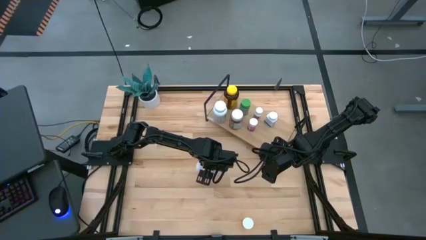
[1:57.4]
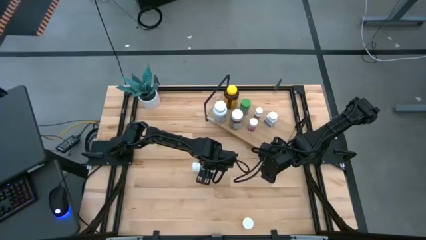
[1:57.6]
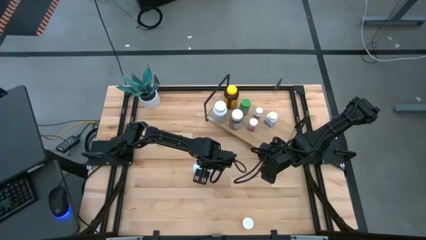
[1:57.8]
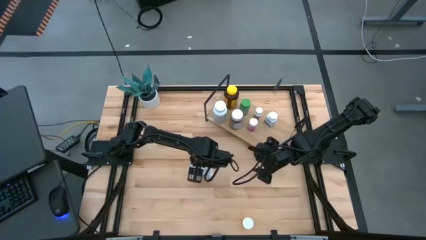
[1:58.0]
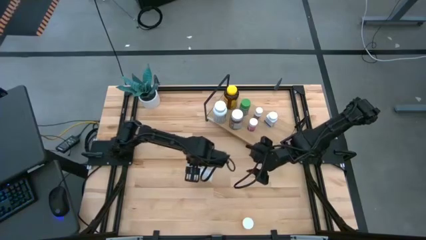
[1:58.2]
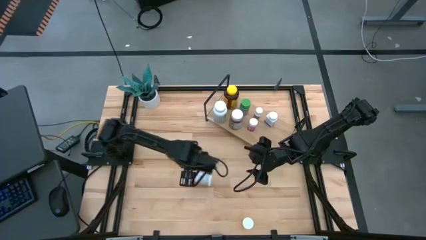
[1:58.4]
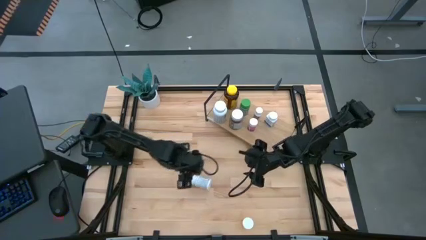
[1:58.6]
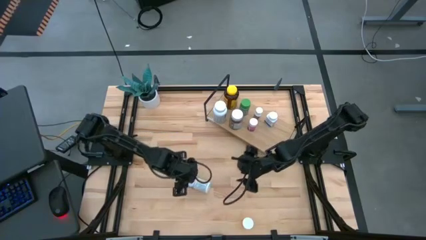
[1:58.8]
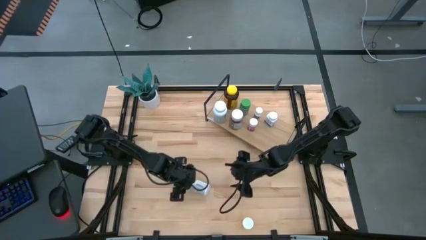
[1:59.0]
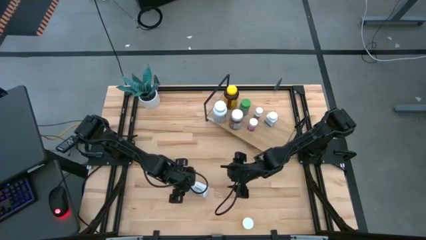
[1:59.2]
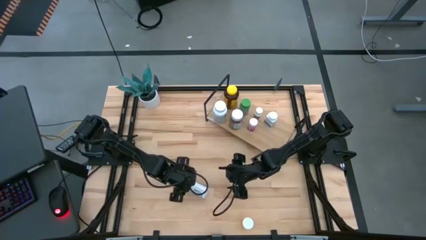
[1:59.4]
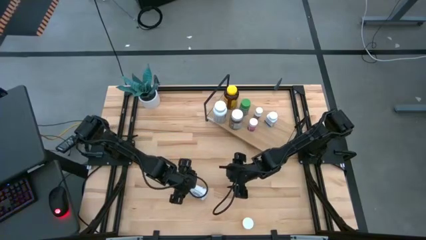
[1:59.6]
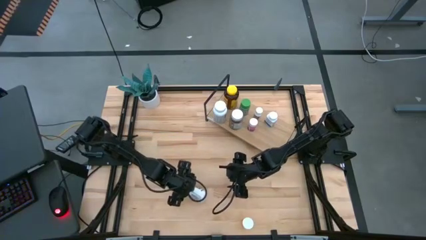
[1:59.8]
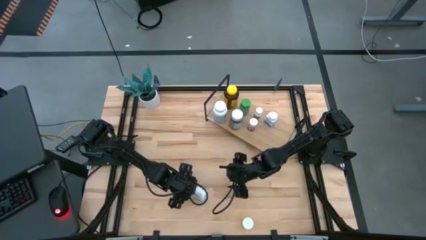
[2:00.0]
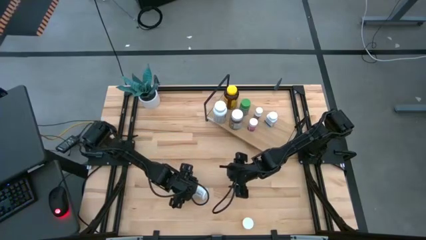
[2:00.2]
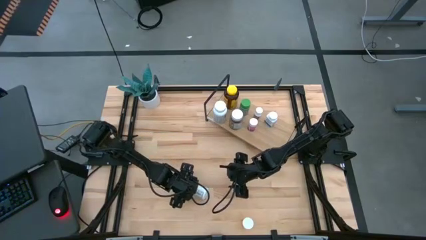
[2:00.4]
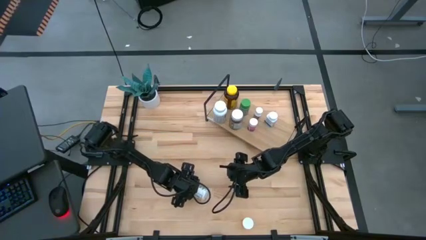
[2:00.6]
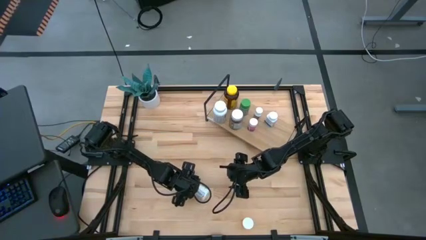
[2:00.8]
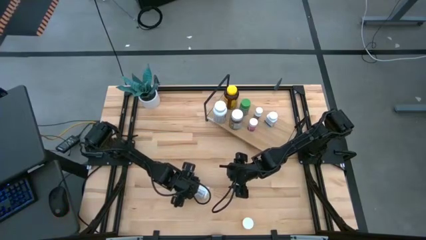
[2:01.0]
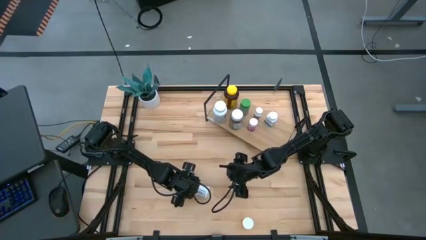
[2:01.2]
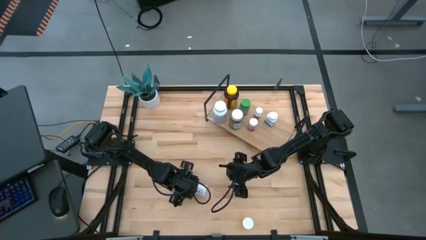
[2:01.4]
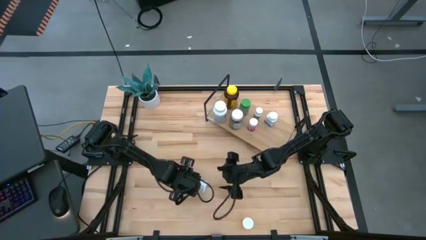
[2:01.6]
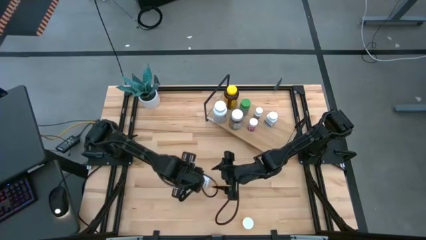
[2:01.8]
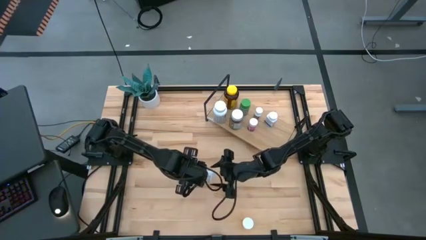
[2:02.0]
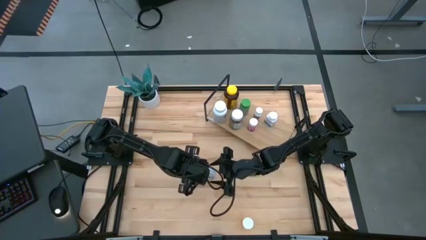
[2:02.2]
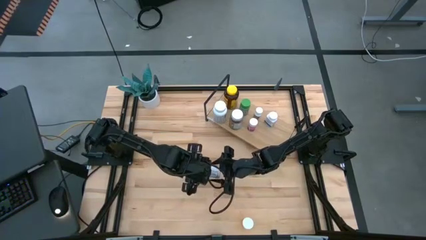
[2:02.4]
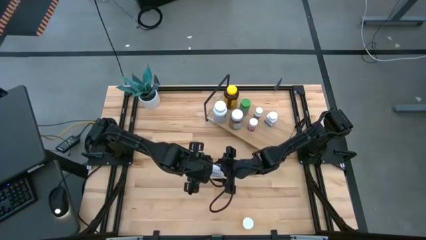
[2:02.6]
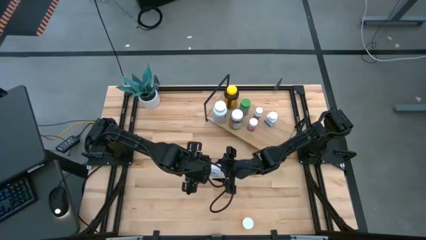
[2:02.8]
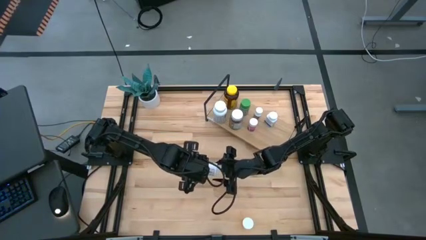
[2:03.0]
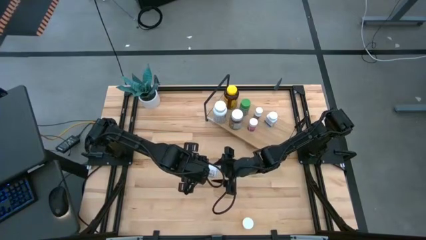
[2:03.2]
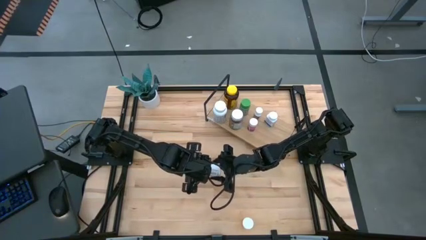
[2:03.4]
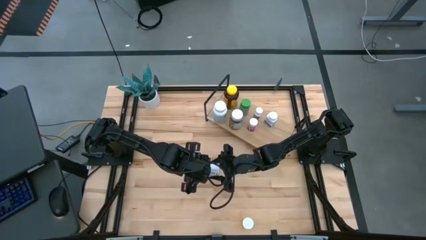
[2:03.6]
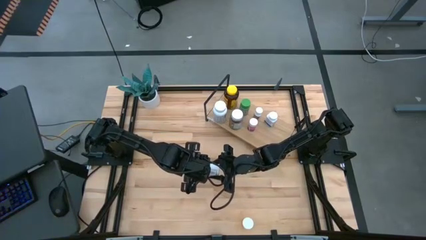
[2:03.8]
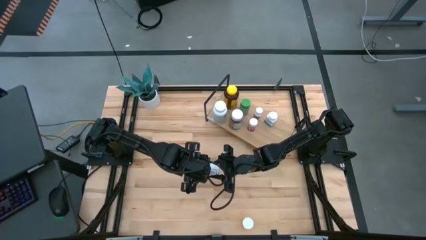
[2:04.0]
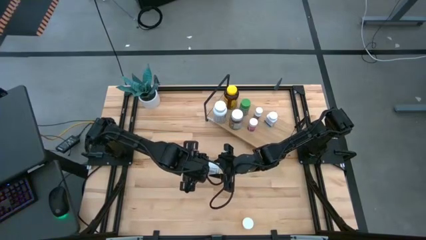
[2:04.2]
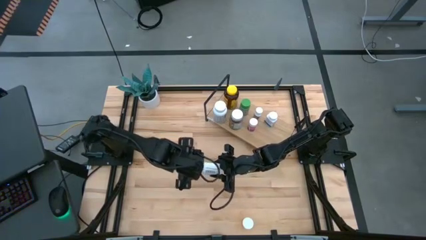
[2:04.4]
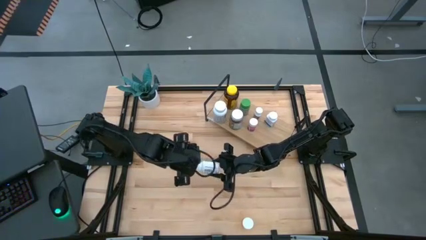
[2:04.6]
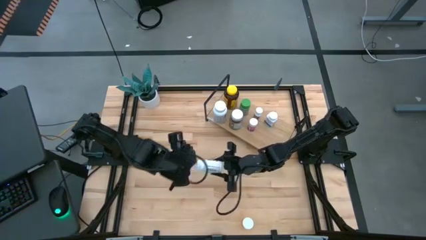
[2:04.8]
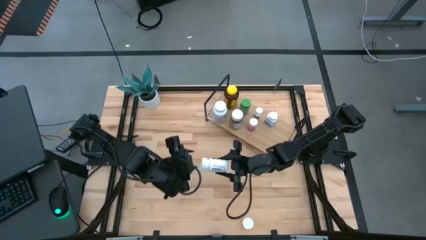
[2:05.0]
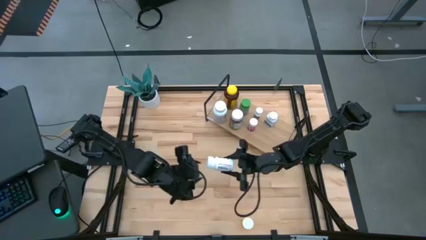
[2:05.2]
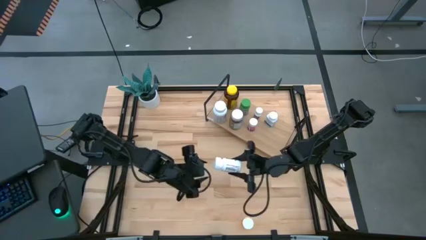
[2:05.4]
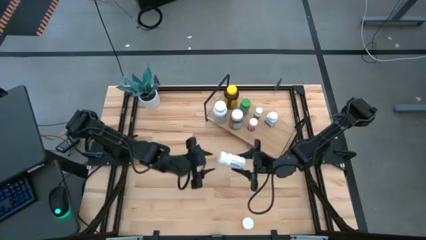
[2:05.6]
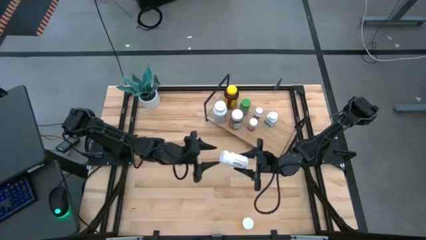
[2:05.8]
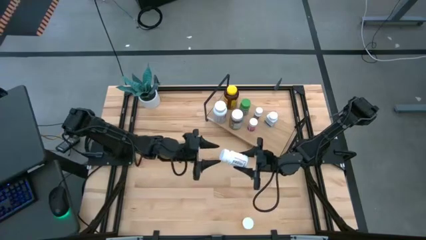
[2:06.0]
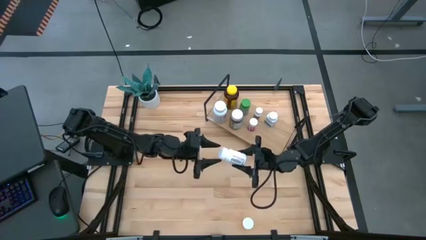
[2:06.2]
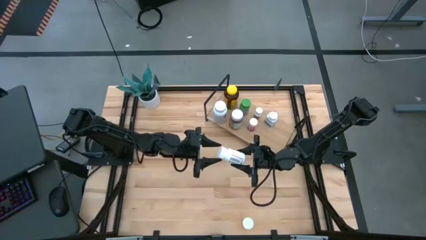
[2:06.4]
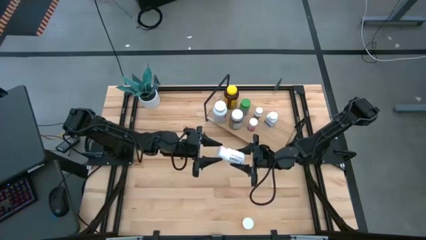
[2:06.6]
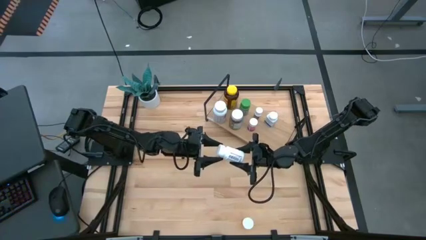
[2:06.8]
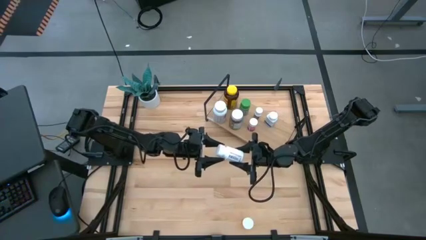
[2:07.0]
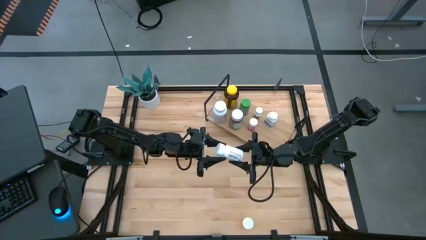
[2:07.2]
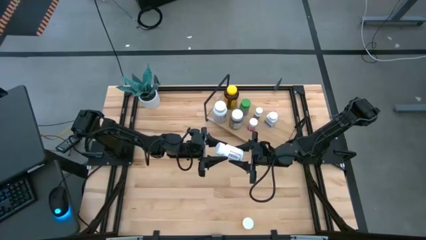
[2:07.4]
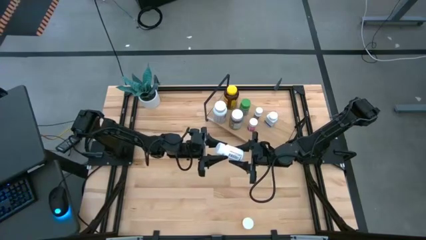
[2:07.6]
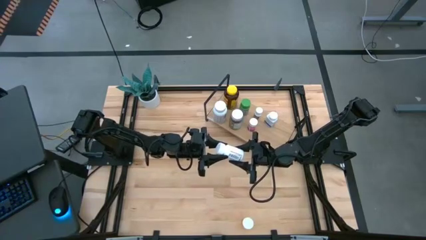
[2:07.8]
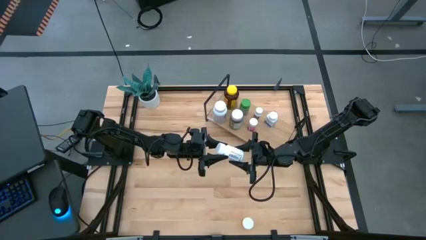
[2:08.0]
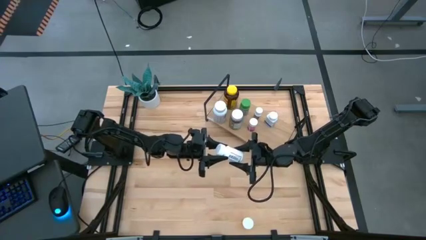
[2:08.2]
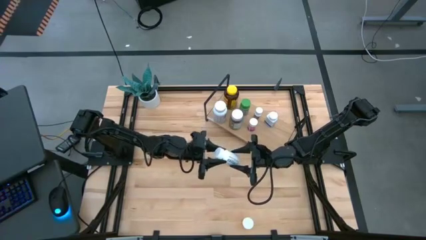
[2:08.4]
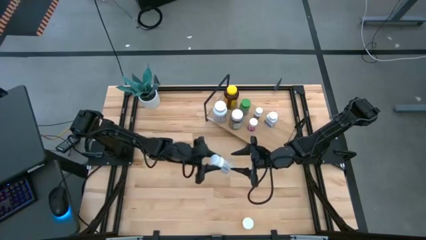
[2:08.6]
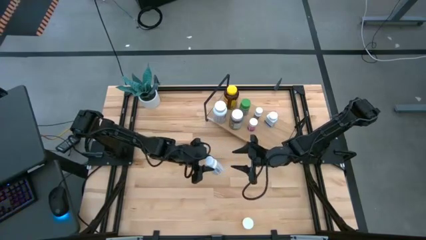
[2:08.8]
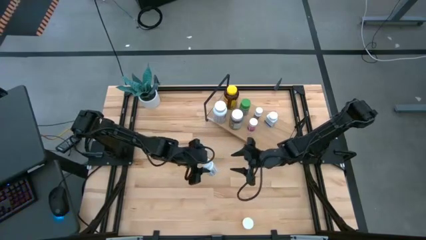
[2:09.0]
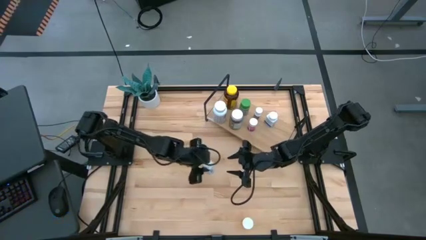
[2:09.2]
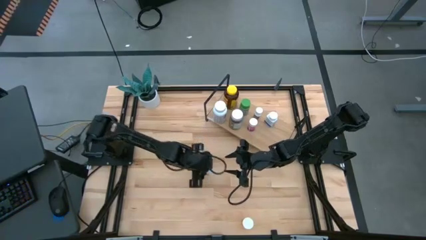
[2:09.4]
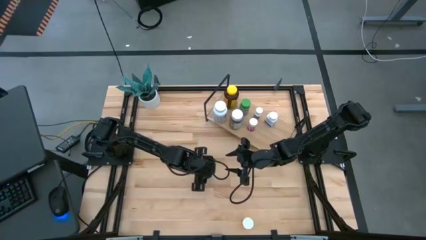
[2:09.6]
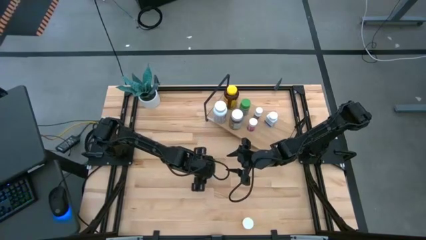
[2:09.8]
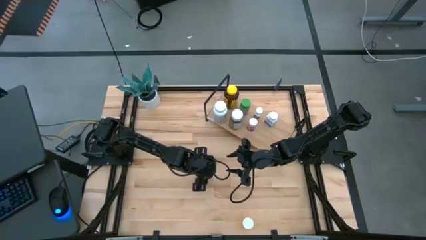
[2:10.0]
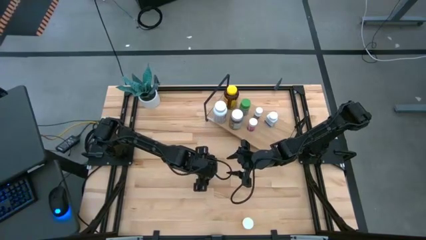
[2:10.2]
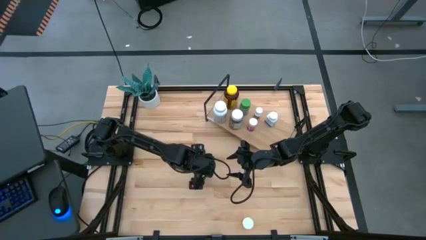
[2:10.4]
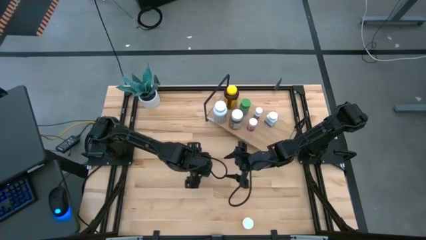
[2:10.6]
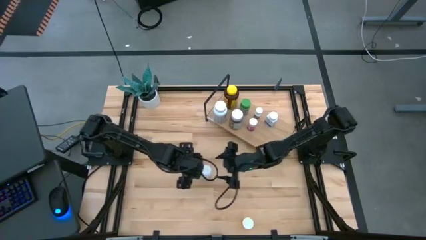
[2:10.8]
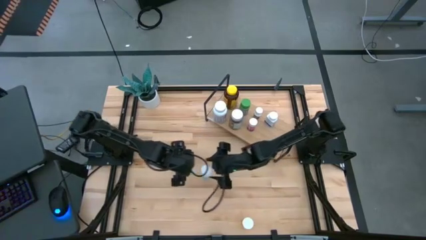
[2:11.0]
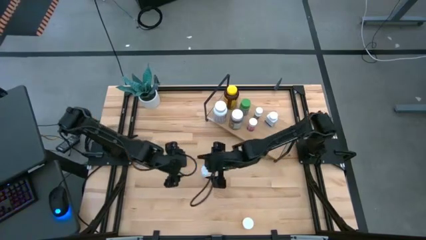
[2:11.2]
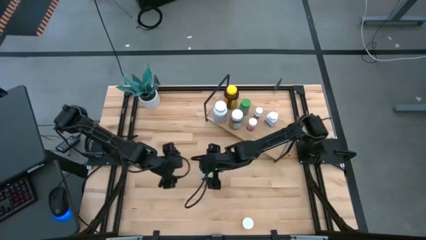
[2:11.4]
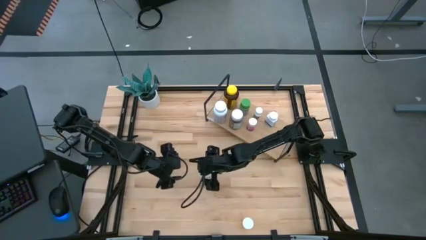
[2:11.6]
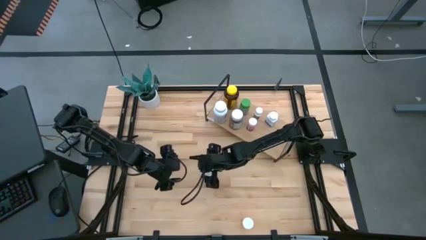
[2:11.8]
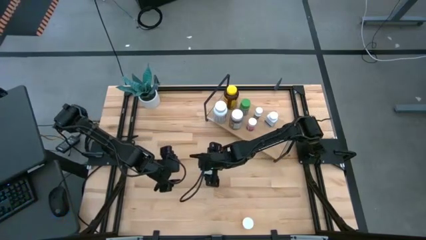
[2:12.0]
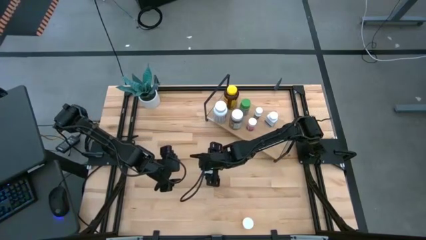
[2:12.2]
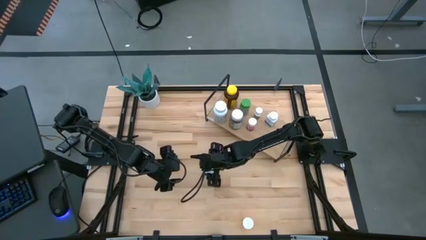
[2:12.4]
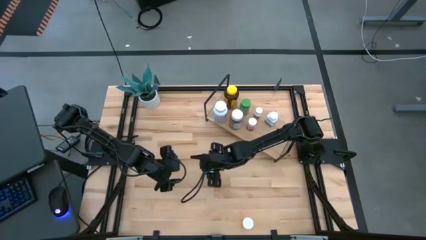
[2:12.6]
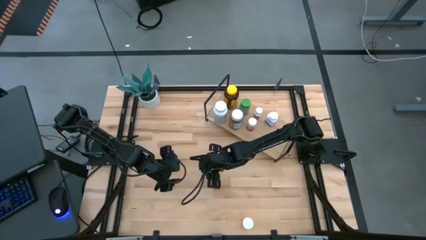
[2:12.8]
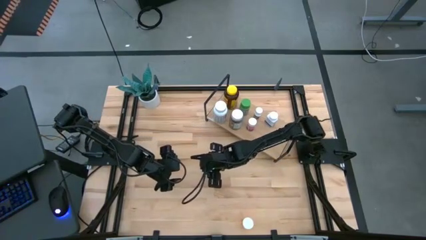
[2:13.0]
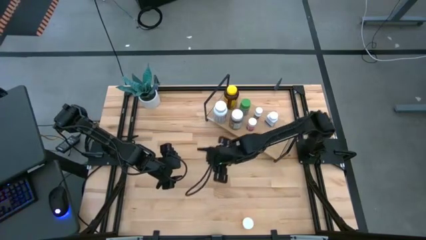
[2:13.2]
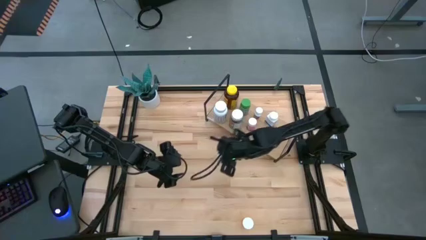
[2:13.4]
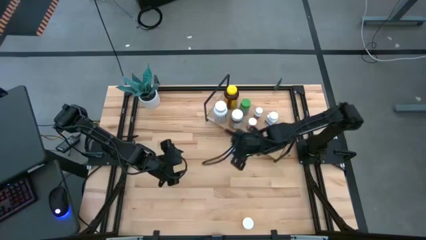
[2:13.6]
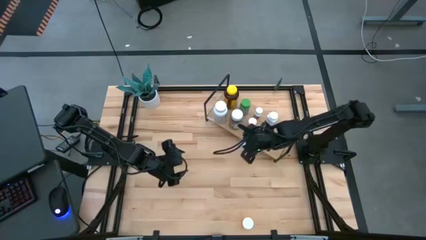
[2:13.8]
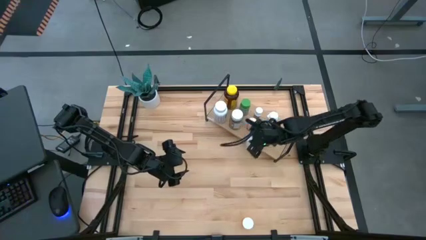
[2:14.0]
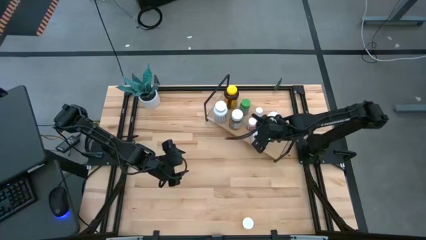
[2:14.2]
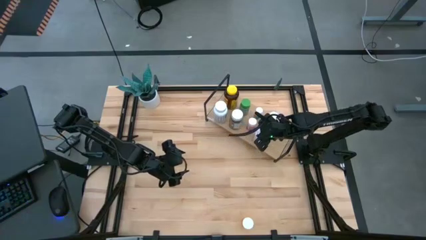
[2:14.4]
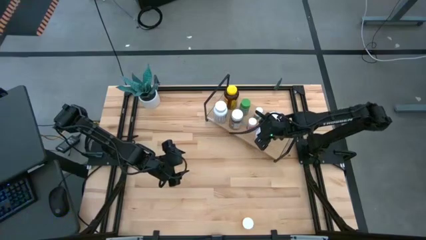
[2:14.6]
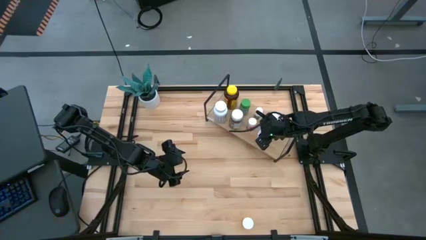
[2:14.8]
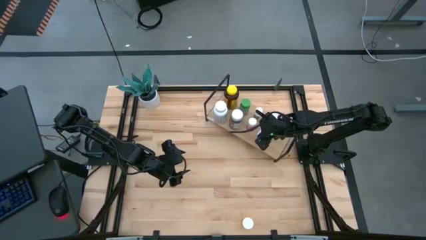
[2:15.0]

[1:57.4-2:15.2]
Task: Pick and place medicine bottles onto shelf by color
Put the white and green pill bottle on the shelf
